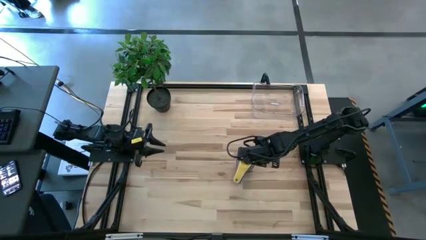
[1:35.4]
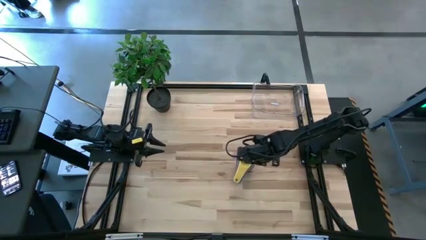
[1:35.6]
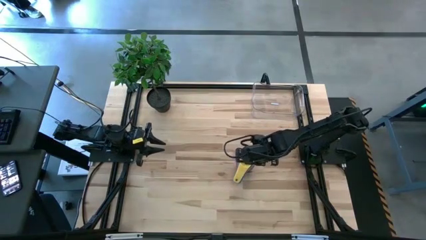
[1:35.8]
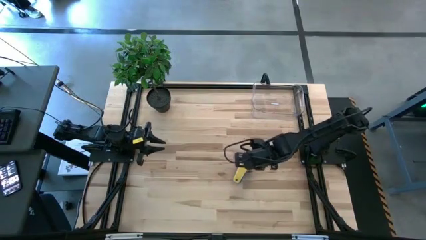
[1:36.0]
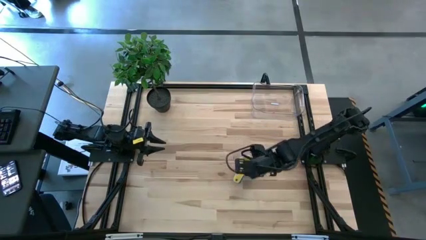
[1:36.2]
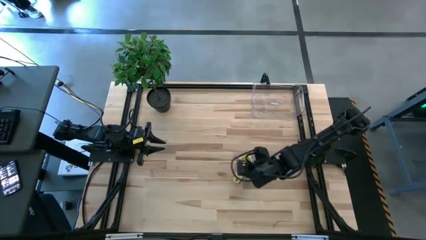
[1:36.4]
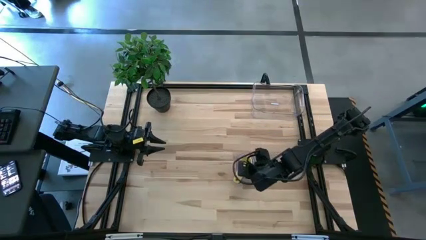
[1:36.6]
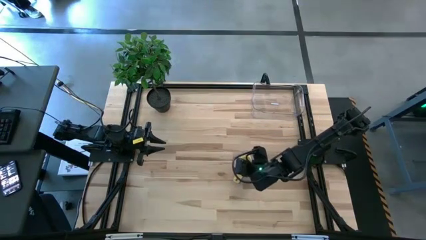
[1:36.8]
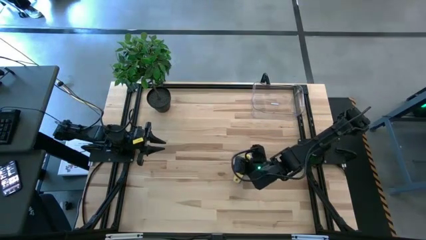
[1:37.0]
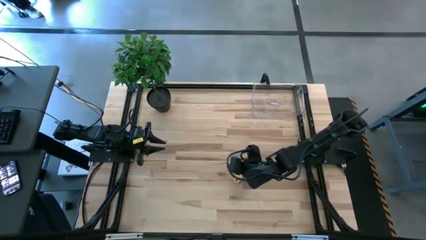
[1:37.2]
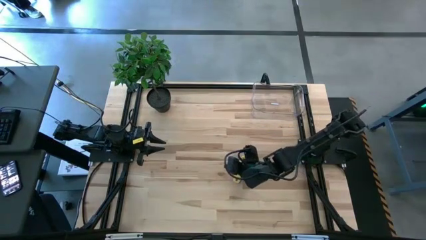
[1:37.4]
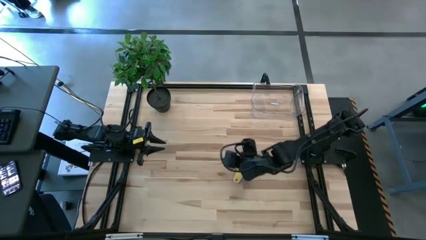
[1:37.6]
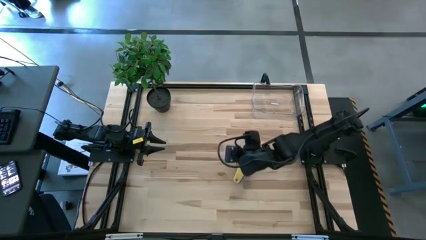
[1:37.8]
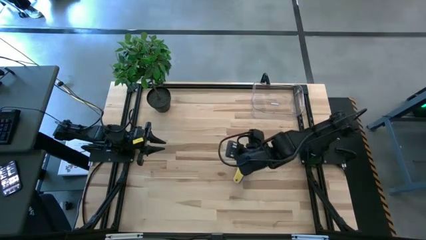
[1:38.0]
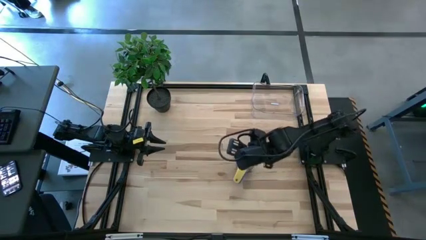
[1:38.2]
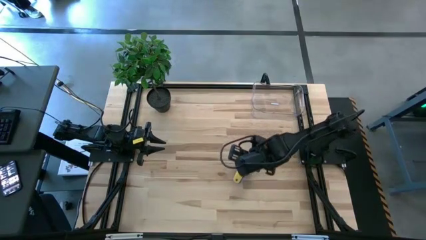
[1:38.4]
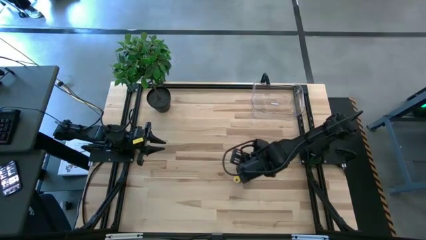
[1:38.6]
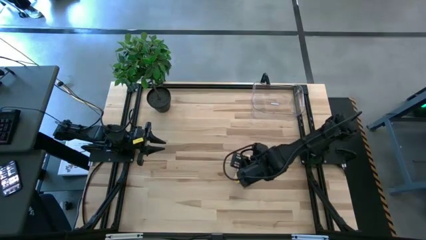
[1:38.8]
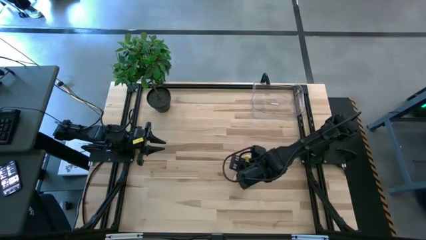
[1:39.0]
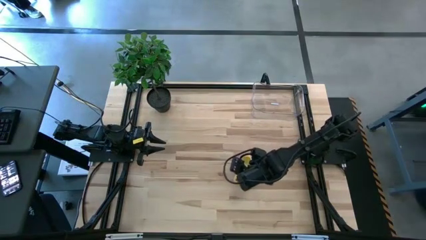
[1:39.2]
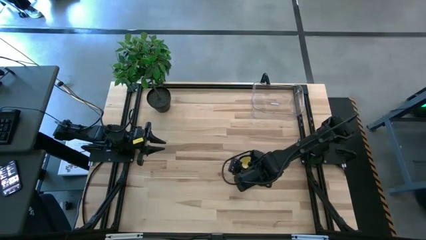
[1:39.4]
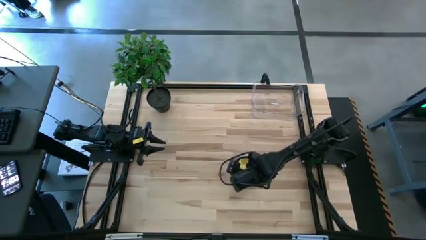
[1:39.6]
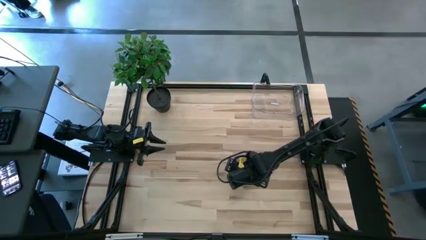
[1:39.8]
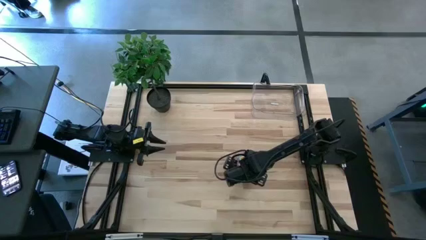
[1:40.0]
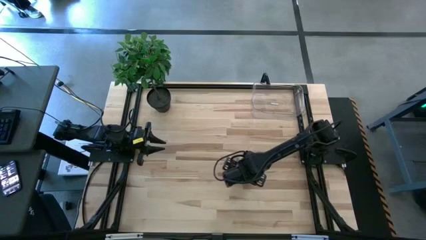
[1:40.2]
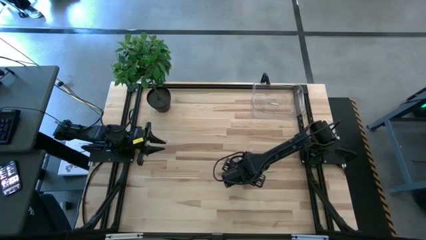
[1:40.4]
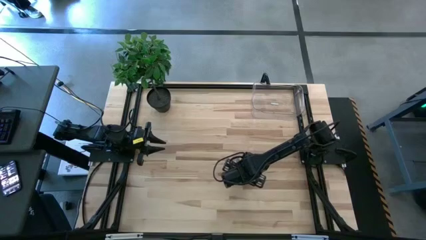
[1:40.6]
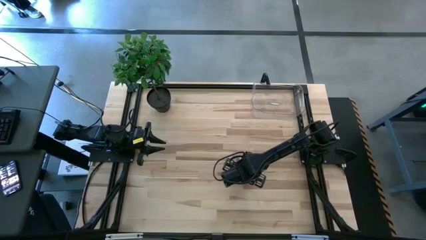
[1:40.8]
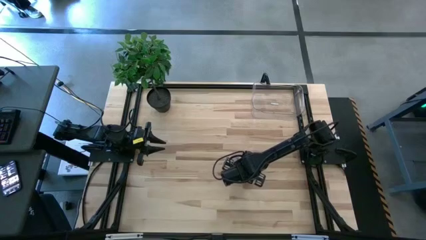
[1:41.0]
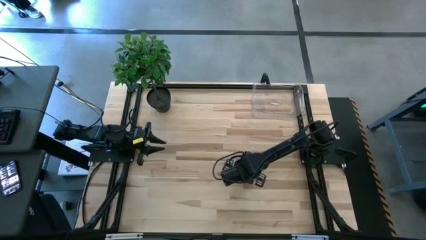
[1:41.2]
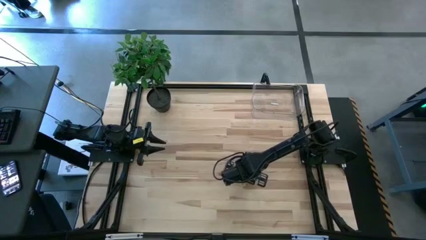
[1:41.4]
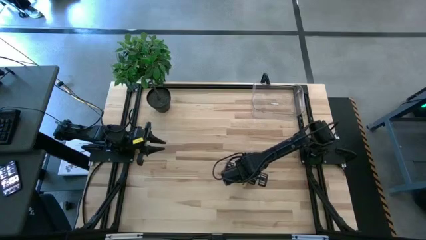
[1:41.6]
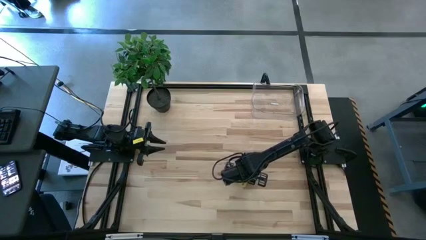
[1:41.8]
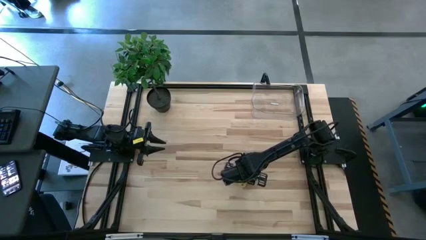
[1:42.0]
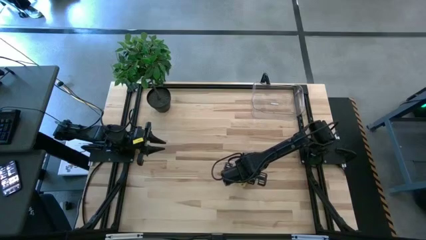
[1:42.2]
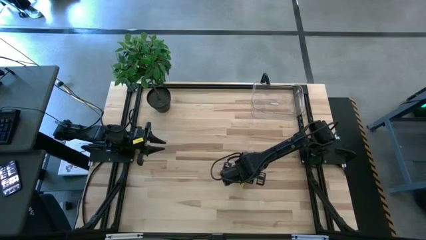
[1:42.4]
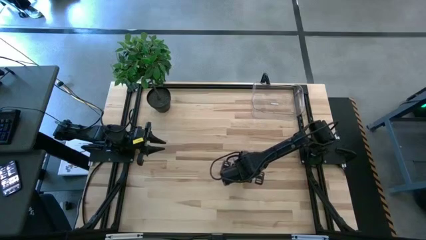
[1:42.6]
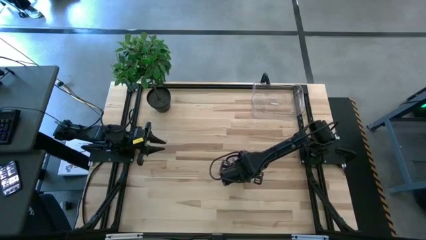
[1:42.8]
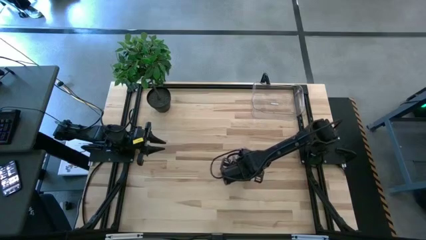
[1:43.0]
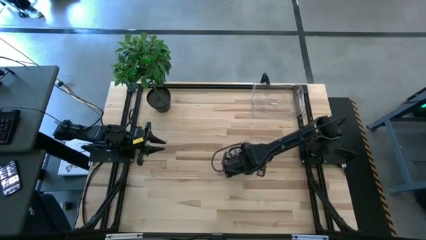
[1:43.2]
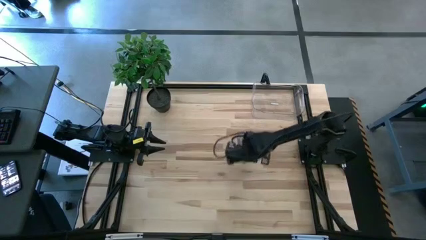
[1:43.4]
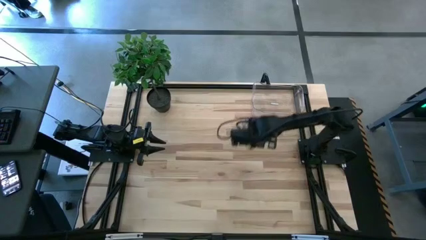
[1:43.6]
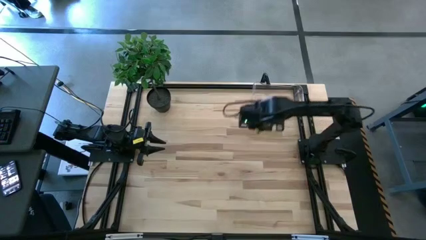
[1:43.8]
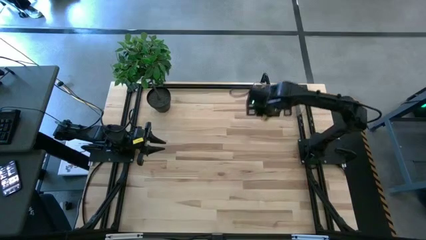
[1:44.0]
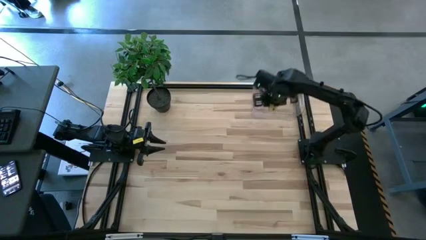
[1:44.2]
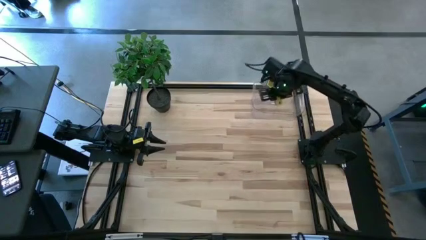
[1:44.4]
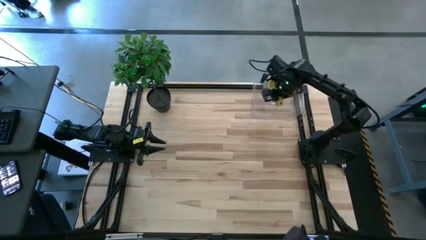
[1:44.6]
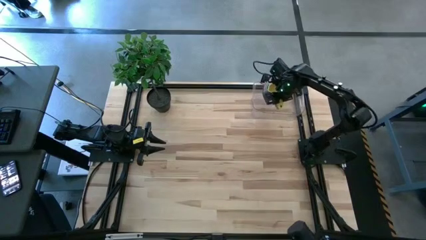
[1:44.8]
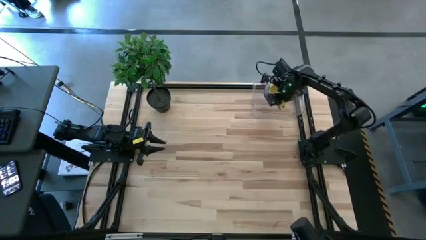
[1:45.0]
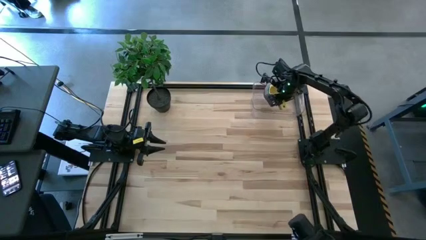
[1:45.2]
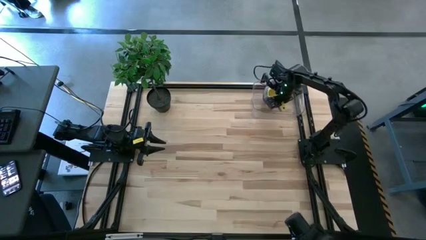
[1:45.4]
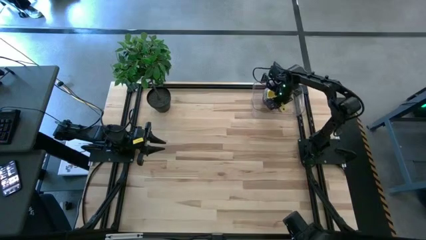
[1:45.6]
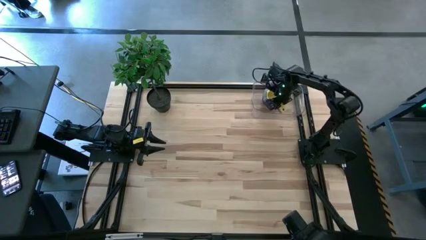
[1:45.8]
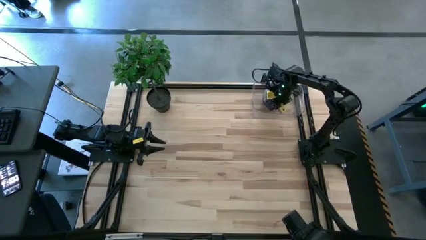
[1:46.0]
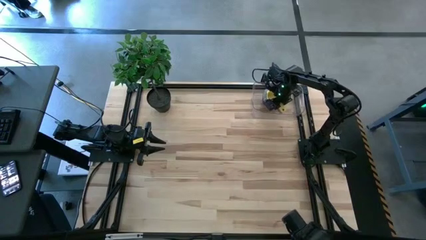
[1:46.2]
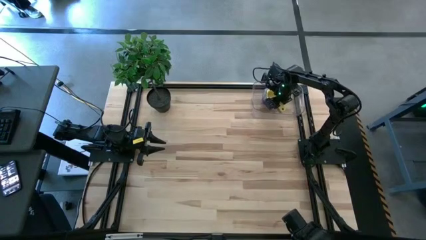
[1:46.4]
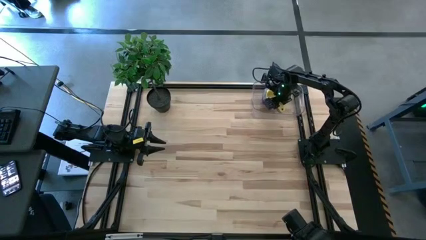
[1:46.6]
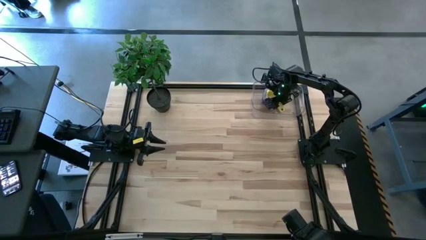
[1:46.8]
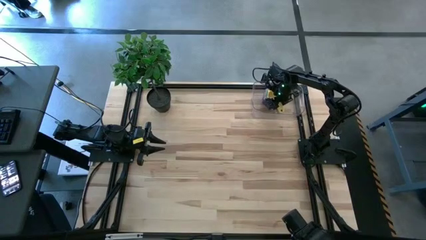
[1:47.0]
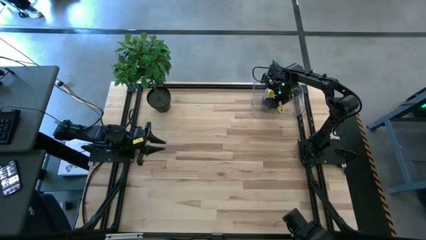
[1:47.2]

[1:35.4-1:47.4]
Task: Nest measuring cups in basket
Put the stacked measuring cups into the transparent bin

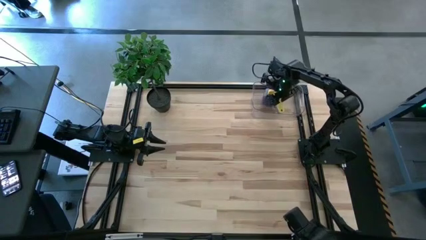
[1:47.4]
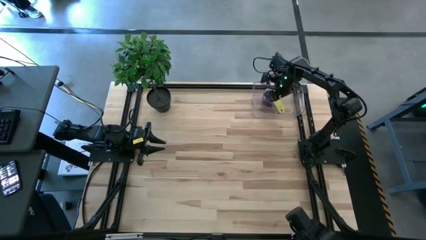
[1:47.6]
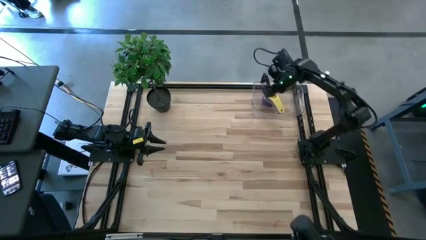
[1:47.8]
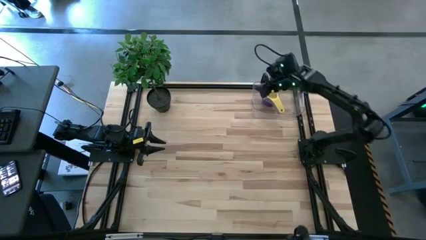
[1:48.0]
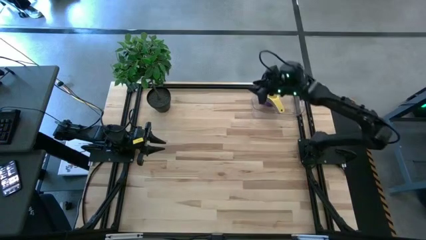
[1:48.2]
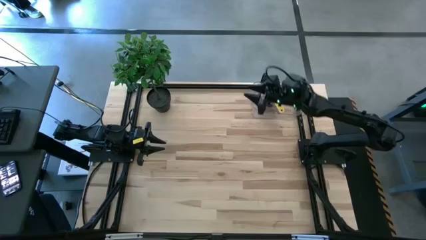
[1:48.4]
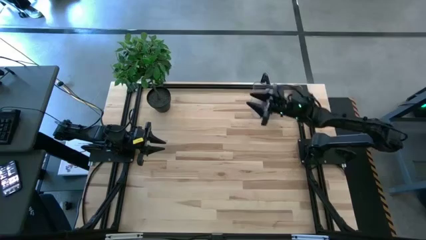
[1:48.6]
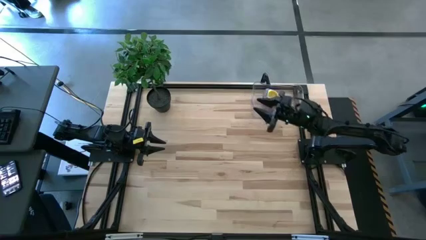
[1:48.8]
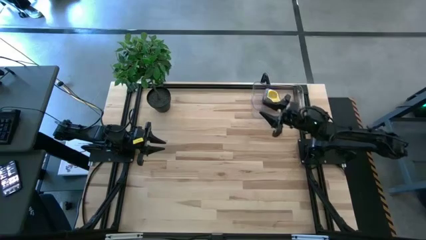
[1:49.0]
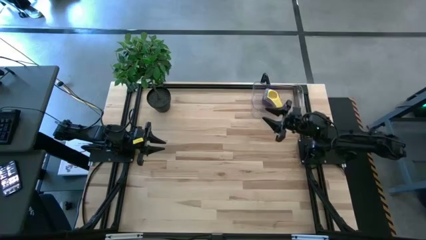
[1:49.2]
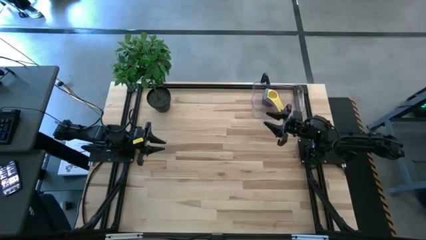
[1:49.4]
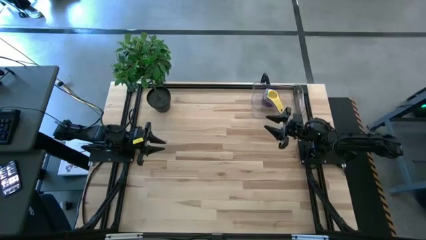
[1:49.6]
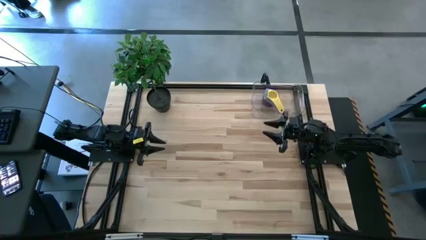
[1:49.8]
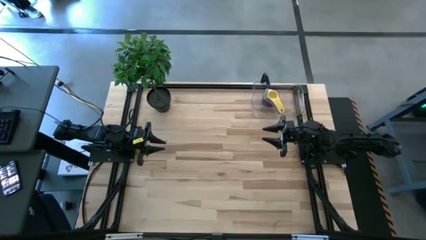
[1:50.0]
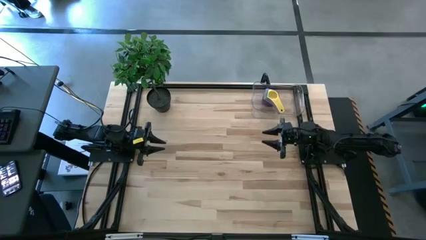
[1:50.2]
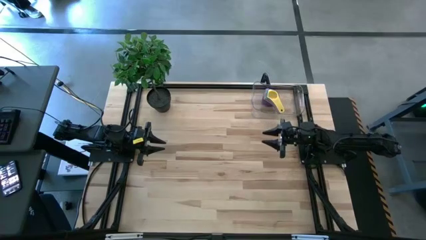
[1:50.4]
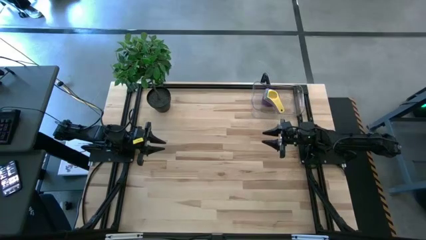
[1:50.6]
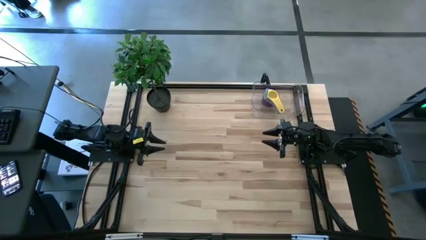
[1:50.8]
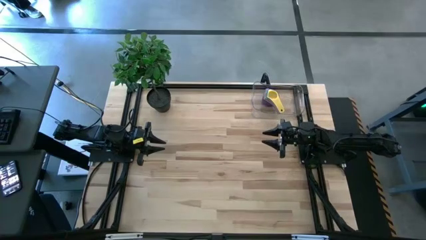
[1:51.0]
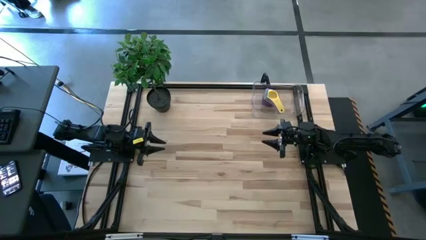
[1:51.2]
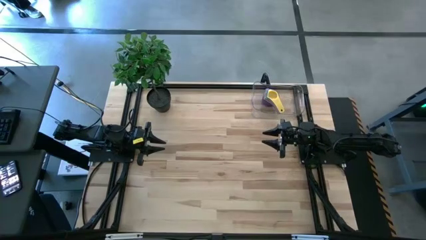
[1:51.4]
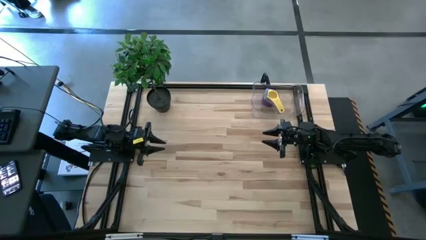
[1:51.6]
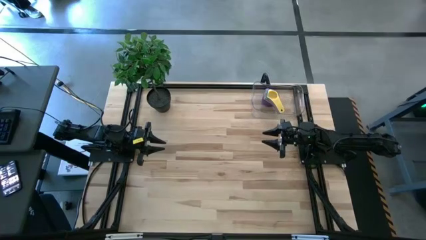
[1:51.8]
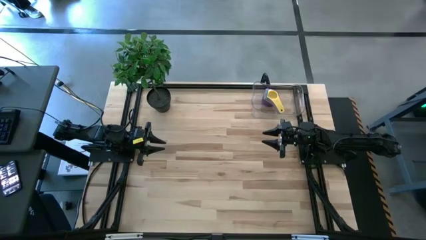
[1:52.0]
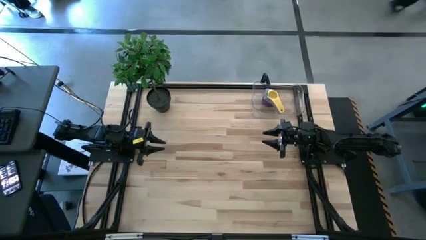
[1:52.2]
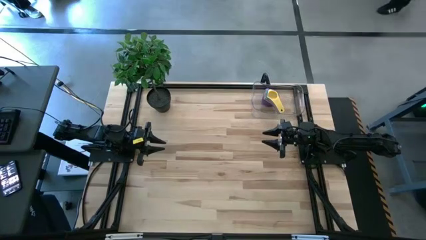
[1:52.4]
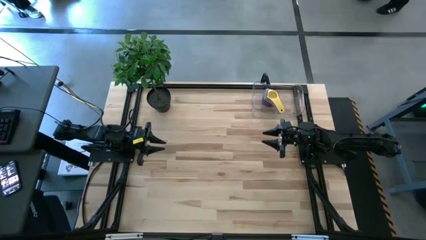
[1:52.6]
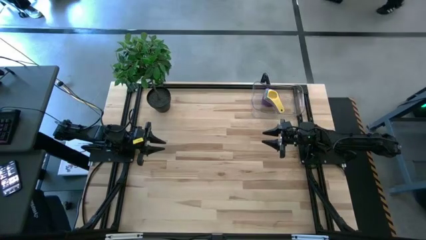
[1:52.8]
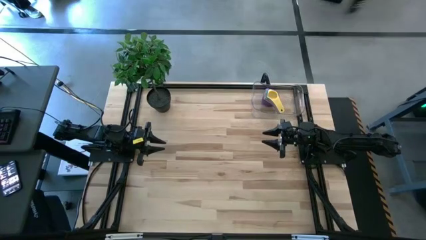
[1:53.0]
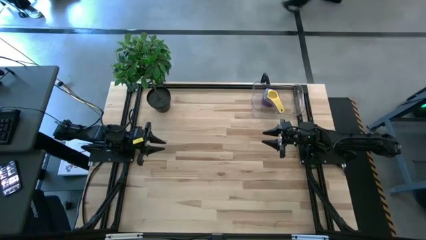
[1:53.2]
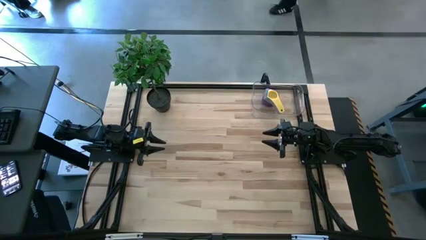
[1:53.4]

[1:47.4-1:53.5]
Return to Home Position
